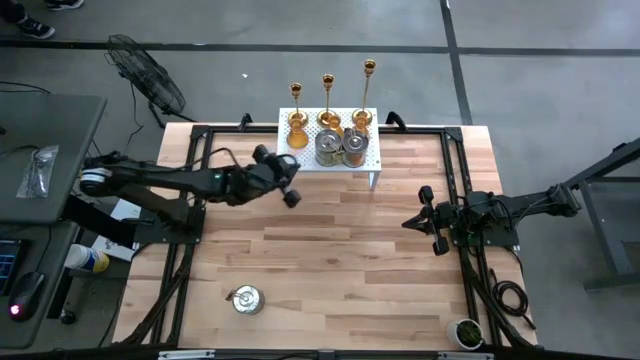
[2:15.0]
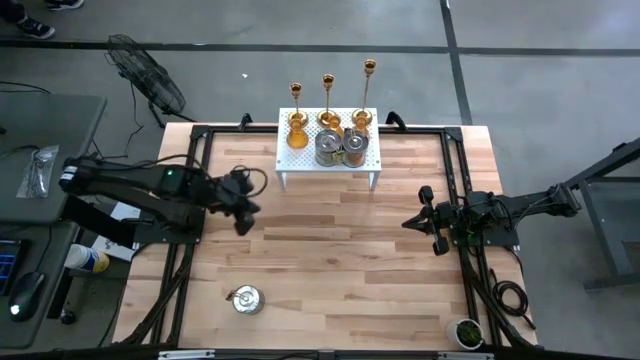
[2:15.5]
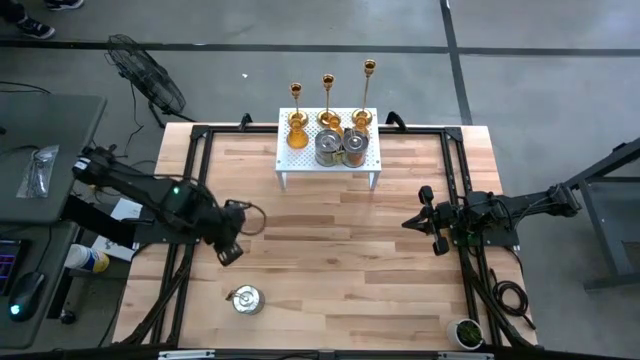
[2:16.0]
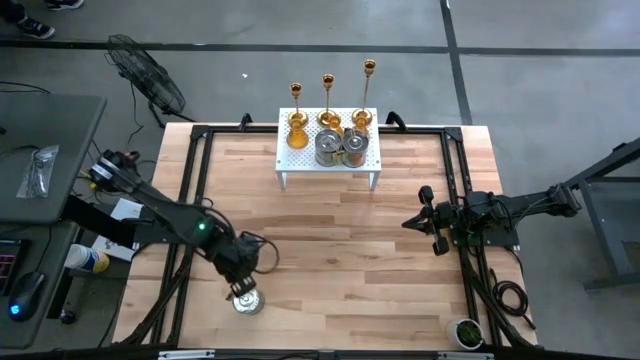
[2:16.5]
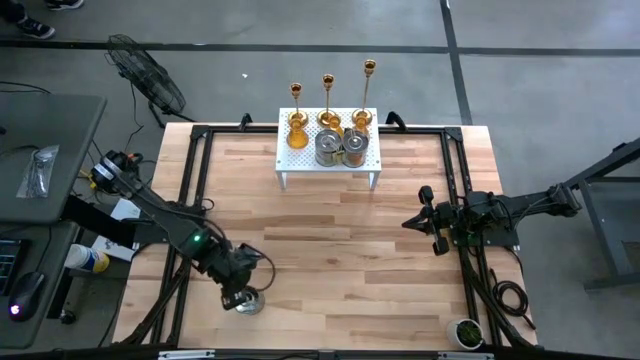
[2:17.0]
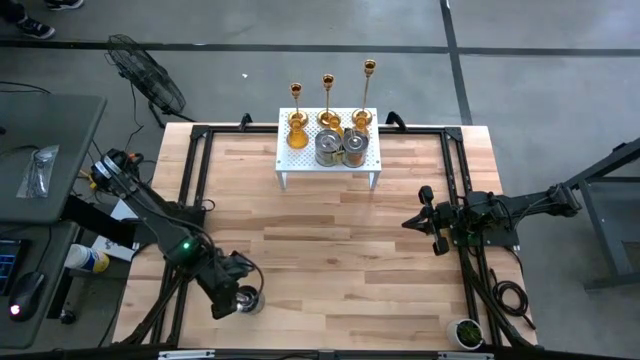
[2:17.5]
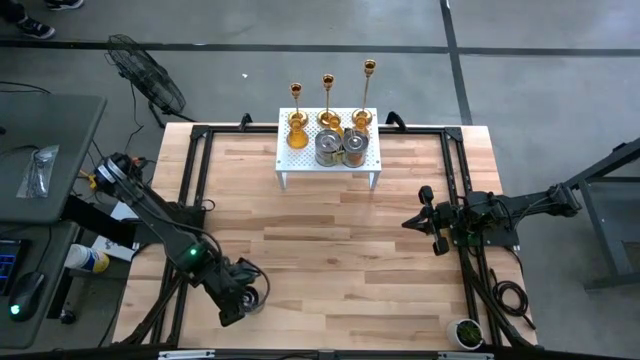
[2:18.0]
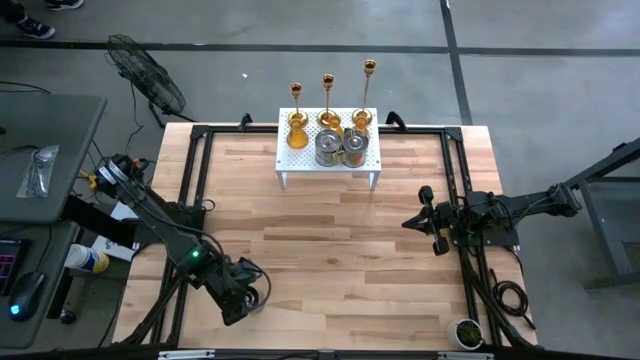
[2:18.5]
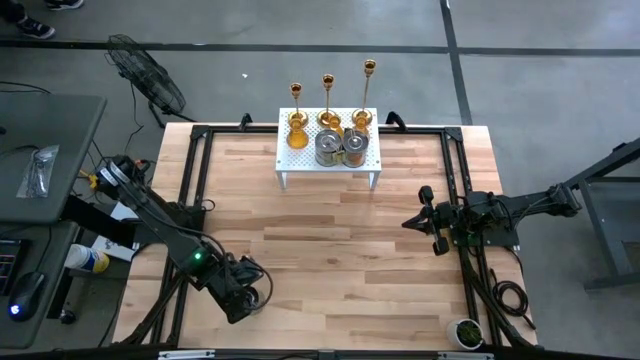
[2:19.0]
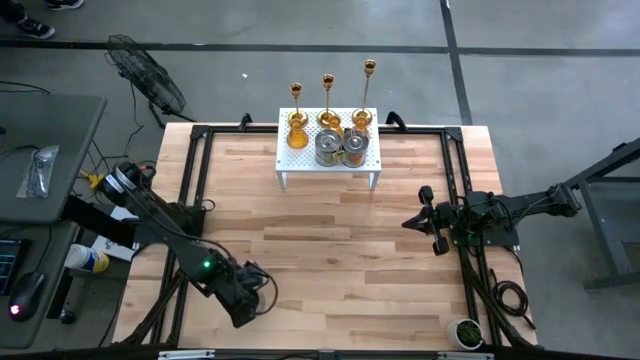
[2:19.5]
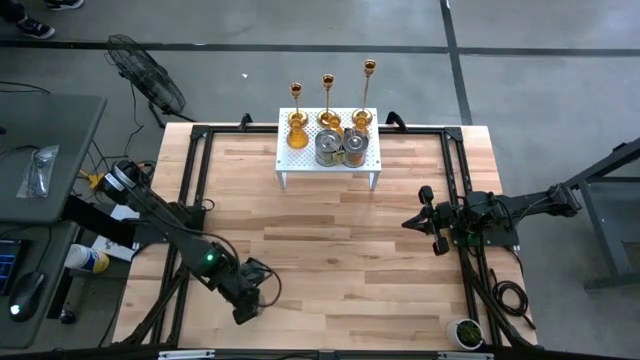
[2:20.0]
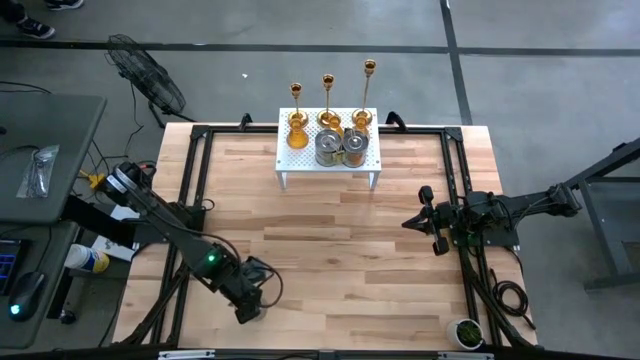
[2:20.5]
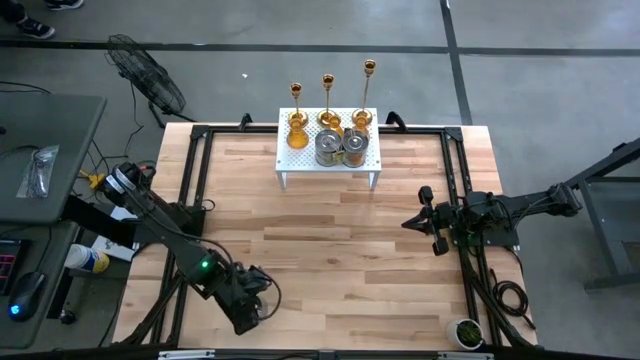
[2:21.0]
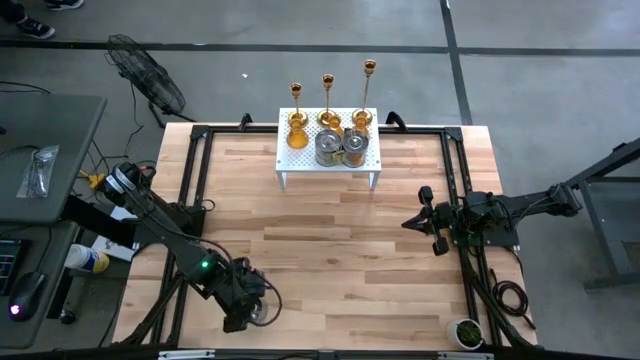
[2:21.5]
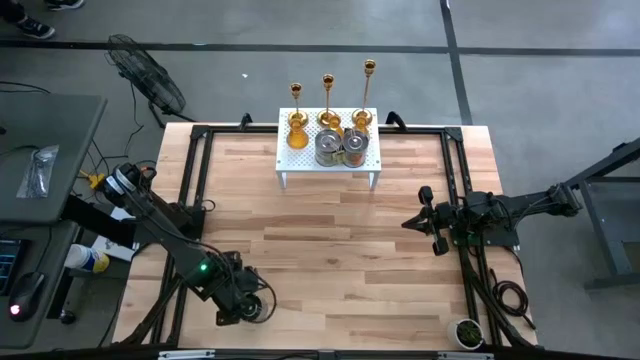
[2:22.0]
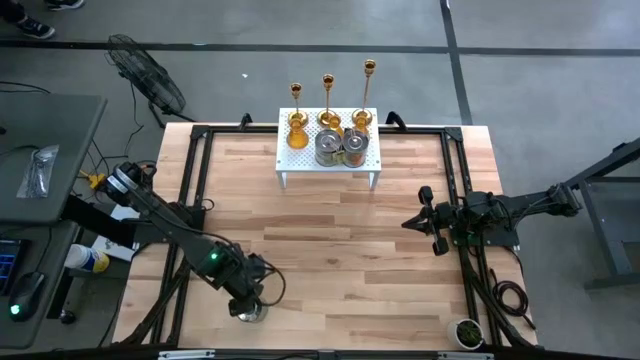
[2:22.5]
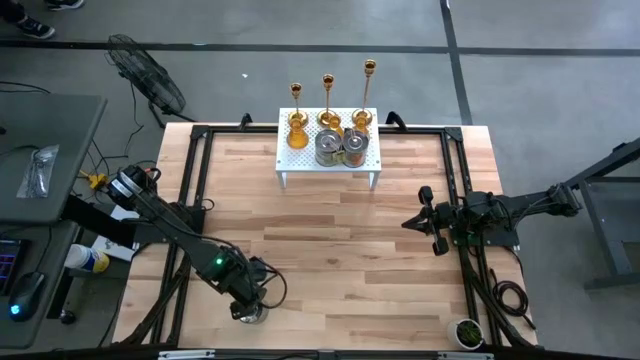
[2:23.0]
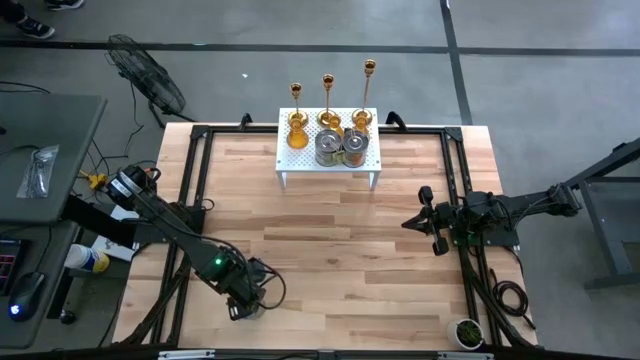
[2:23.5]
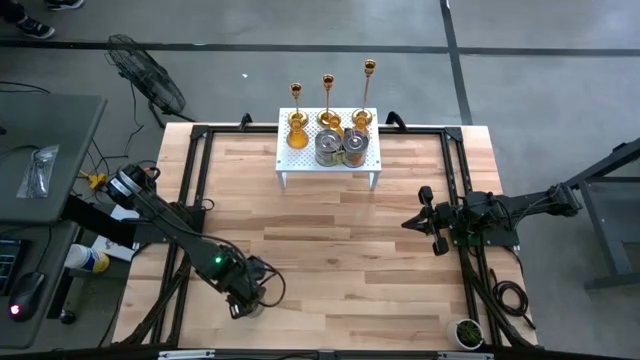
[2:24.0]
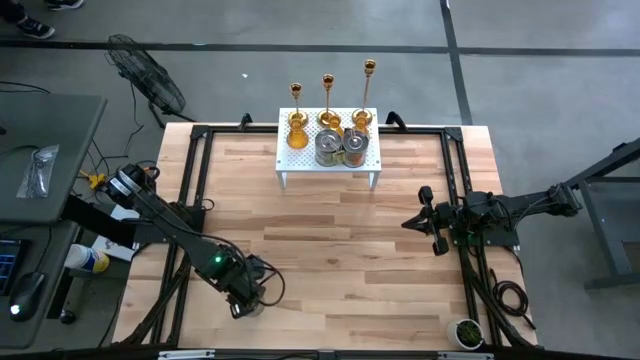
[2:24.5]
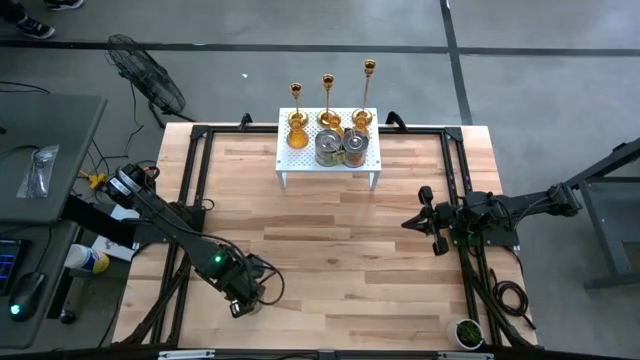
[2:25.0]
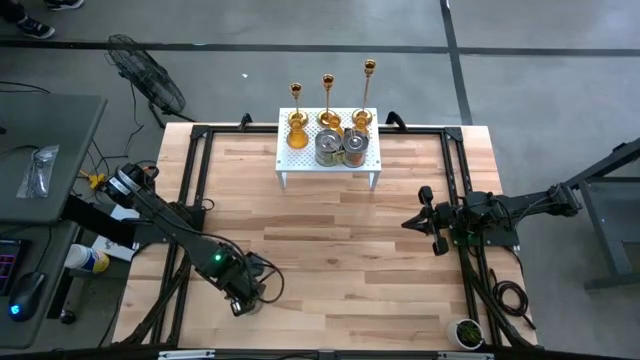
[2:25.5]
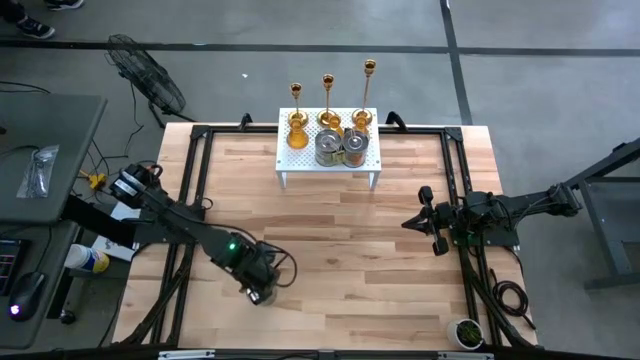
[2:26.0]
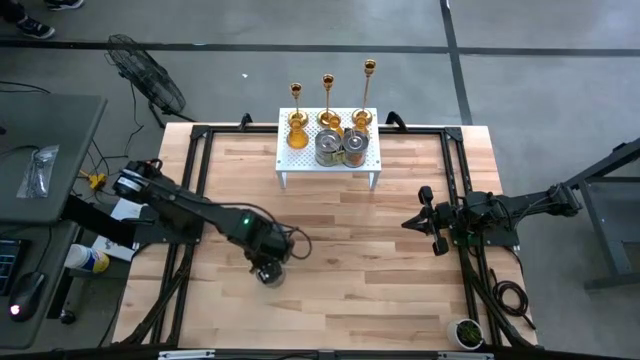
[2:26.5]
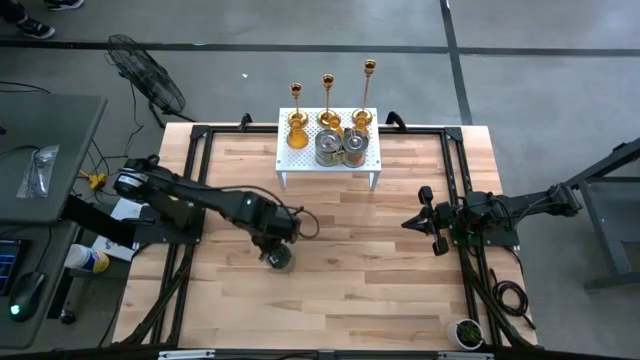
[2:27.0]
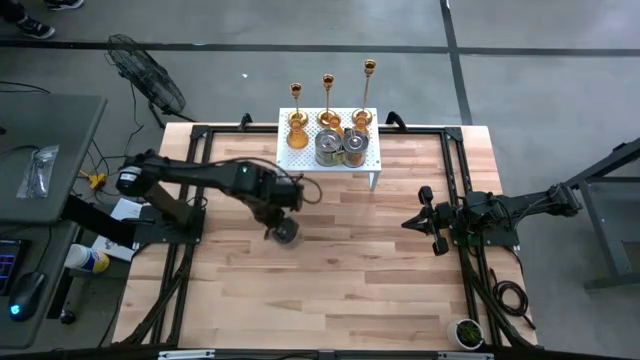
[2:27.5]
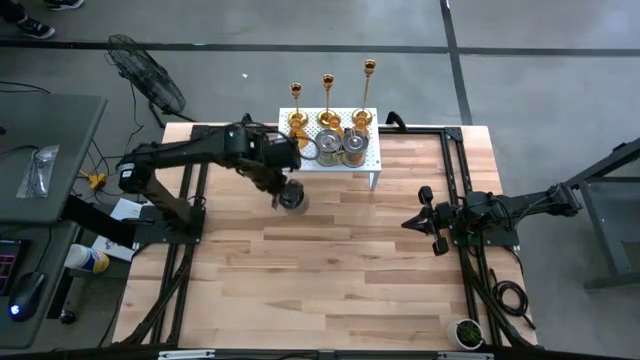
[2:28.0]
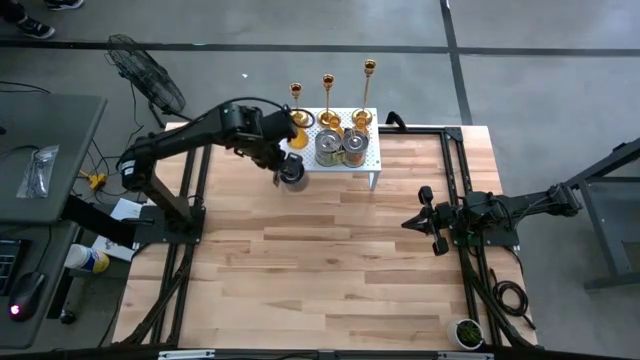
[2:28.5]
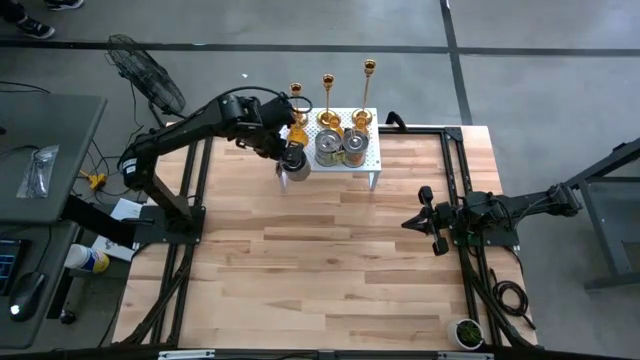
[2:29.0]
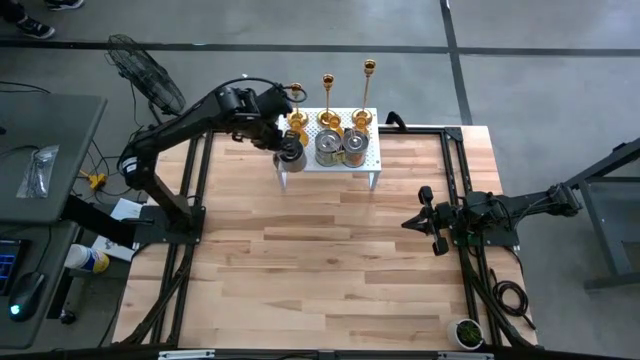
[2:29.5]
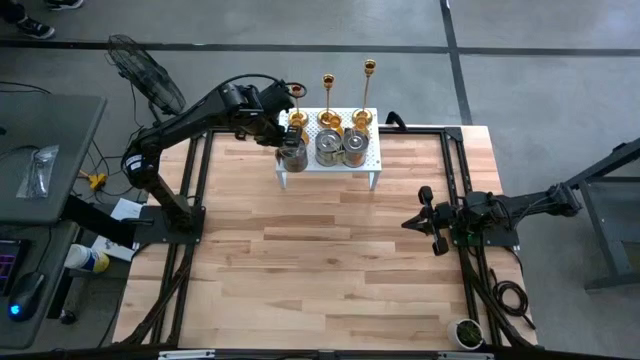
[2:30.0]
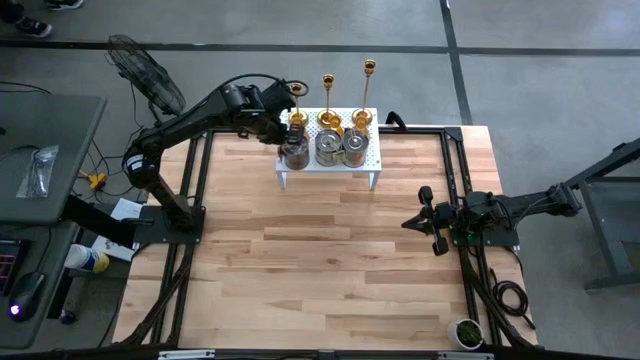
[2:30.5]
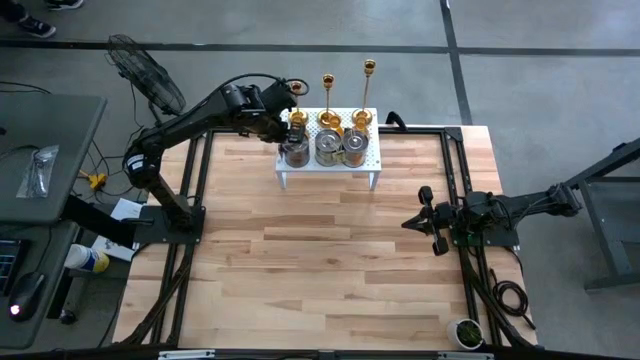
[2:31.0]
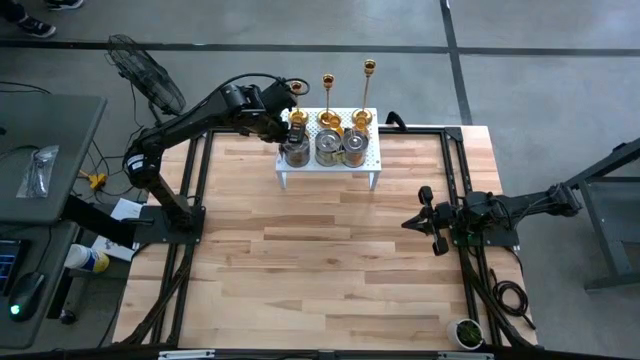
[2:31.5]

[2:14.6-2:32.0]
Task: Pick & Place candle stick holders
Put the silver scented candle on the shelf aligned with the other silver scented candle

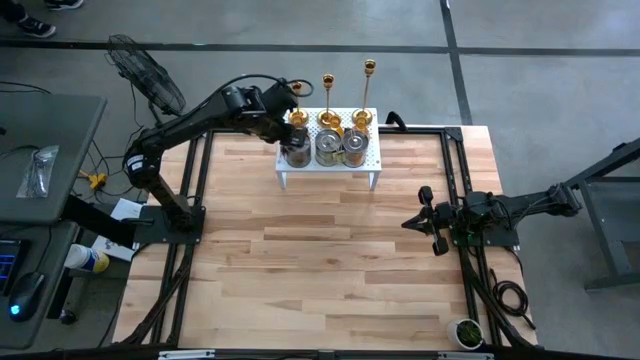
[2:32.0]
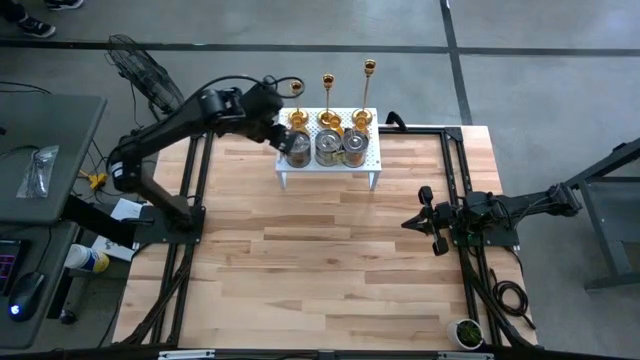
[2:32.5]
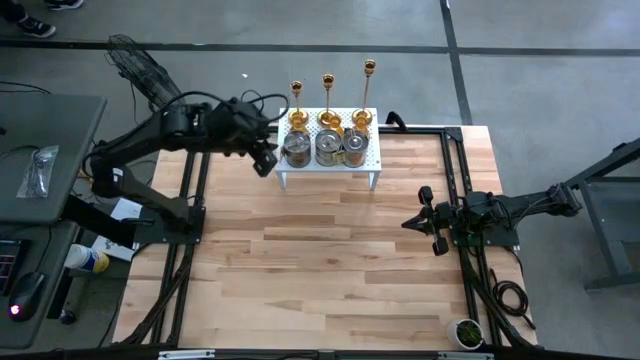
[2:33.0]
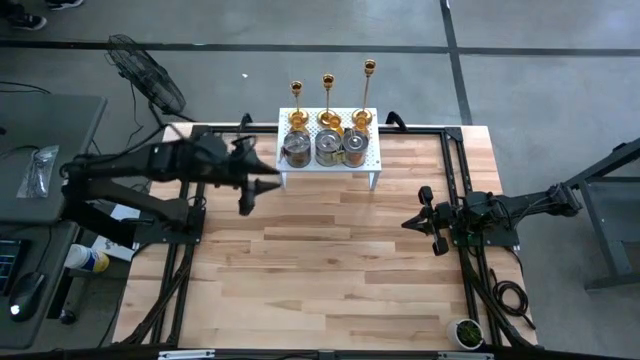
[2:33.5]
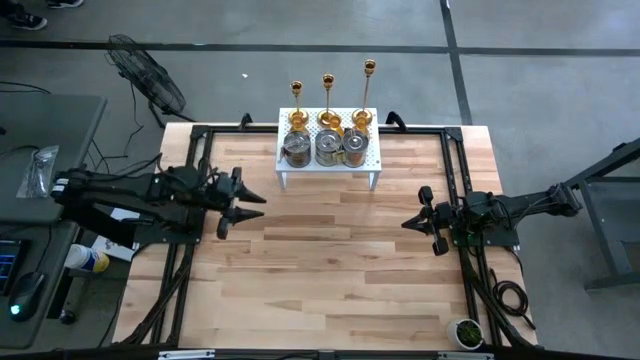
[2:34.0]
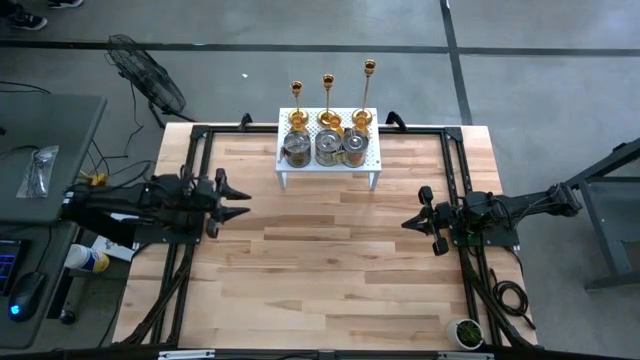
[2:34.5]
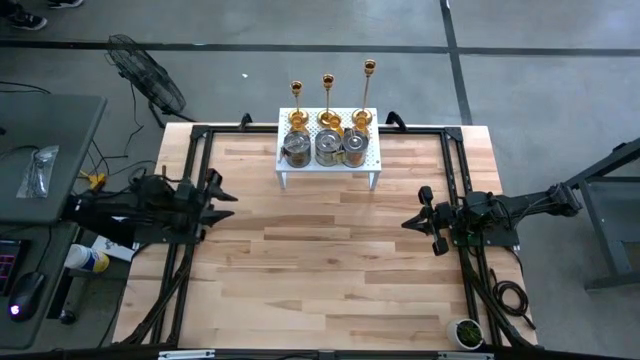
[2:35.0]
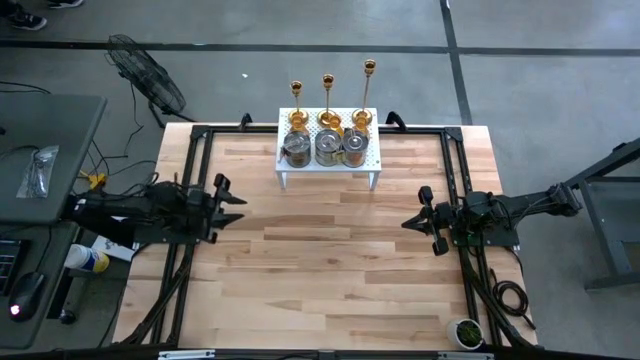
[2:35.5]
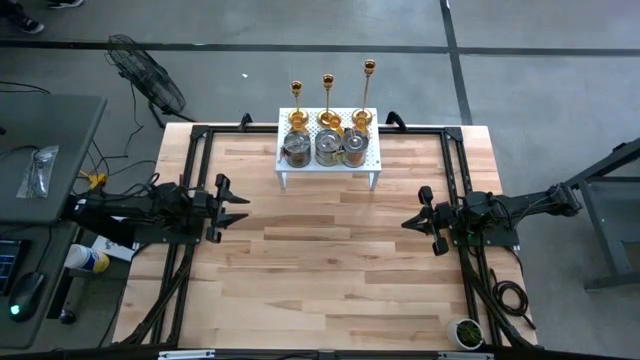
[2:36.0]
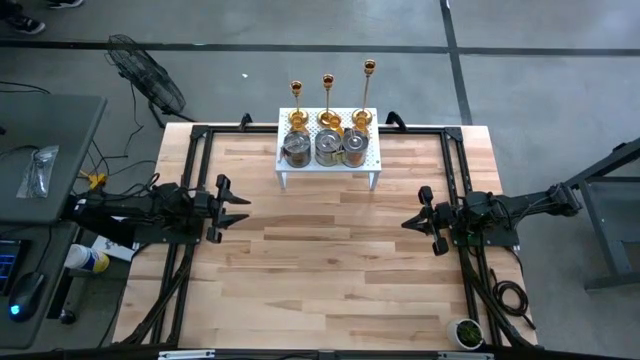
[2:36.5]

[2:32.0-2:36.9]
Return to Home Position

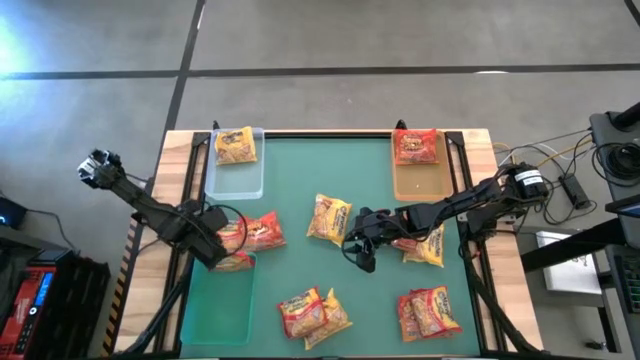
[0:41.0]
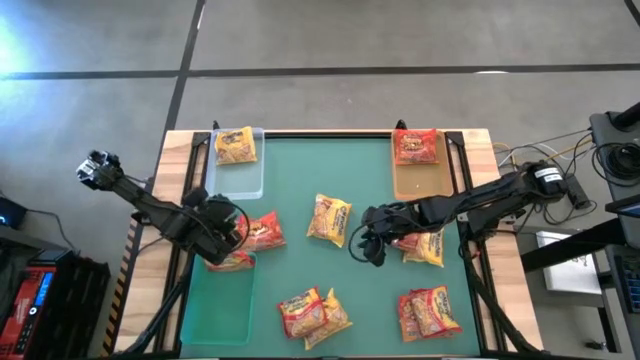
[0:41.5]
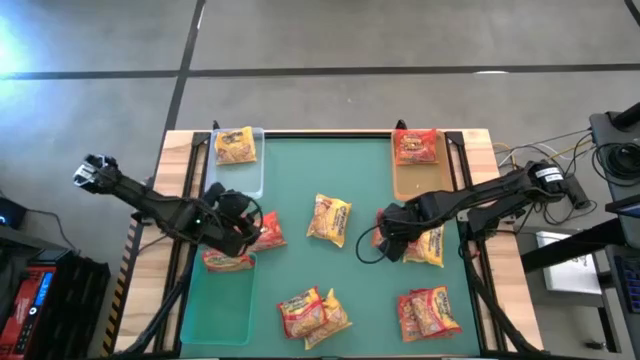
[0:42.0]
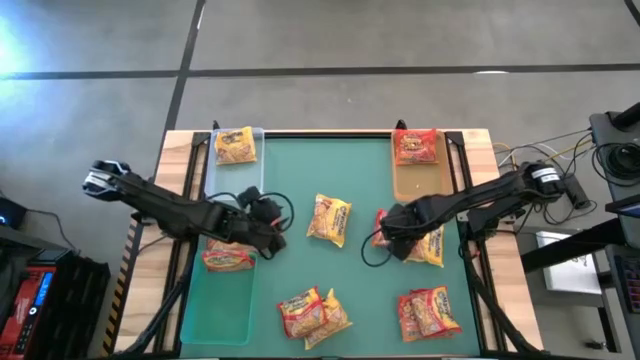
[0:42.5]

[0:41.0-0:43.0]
Task: Sort Maruchan noodles
Adjust the orange noodle pack
